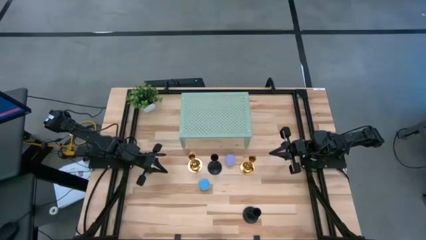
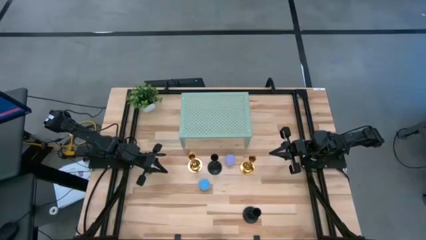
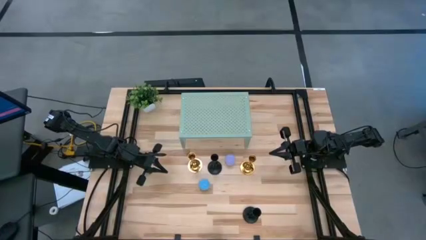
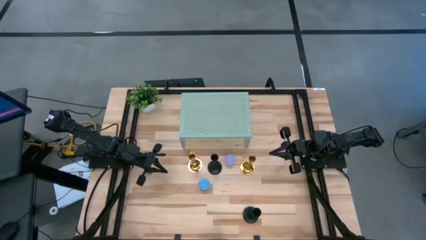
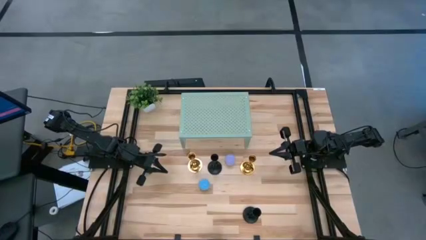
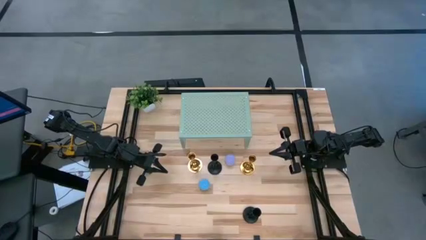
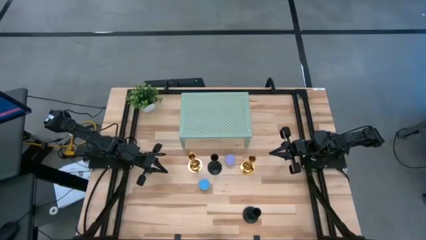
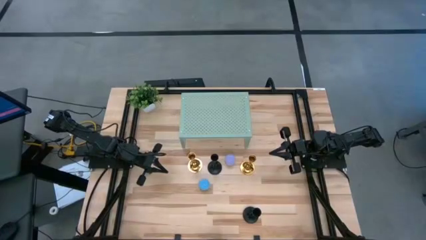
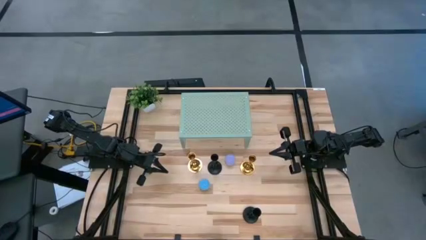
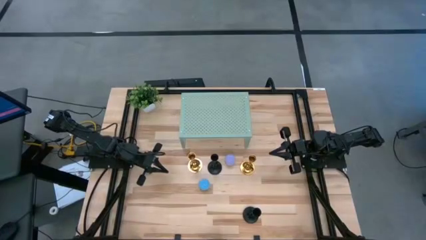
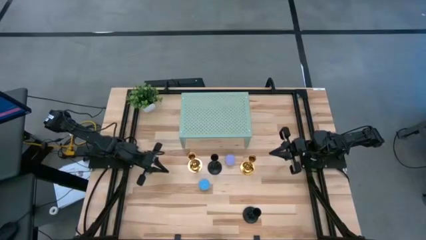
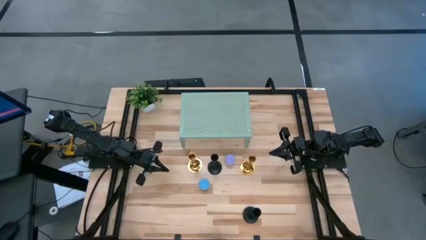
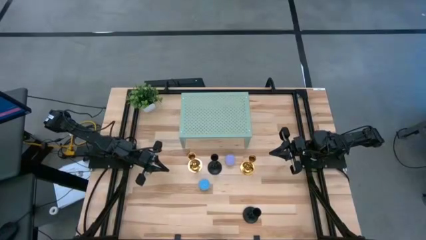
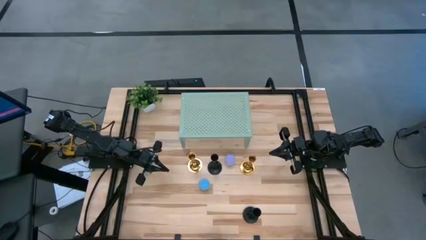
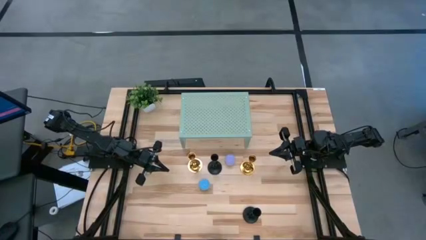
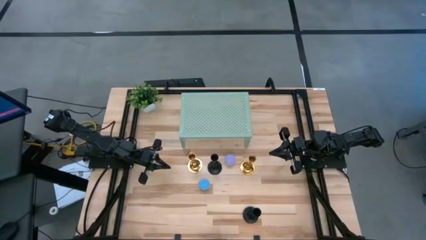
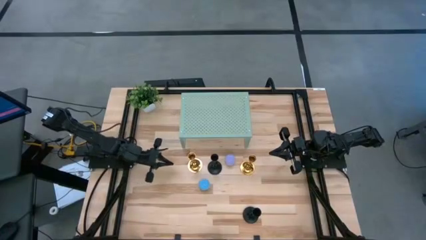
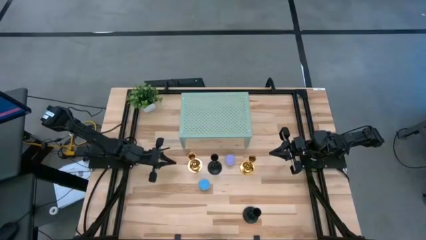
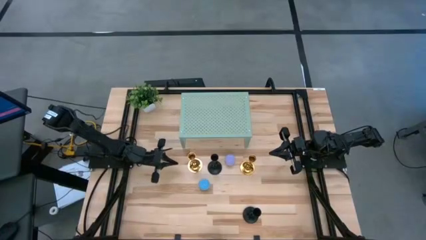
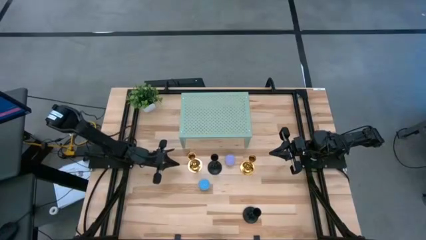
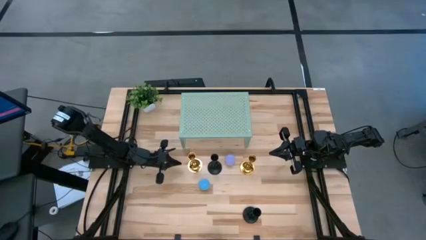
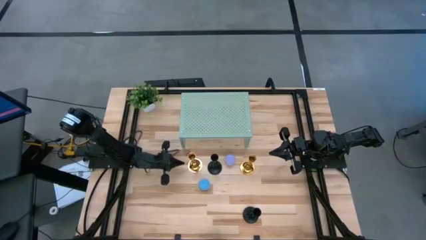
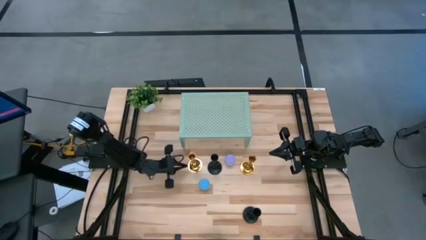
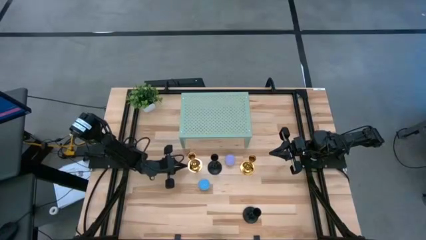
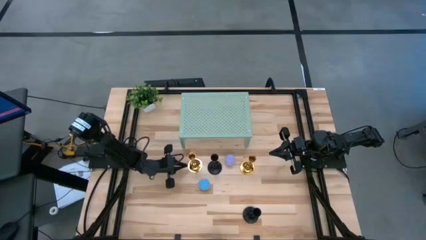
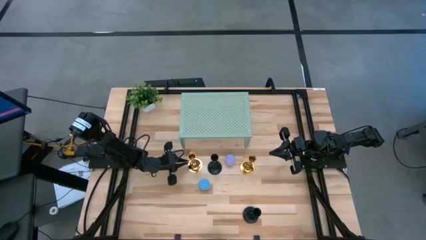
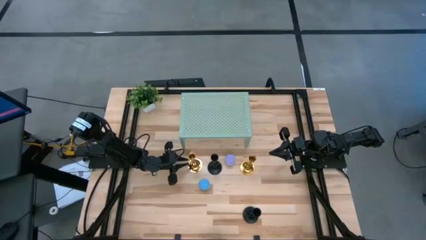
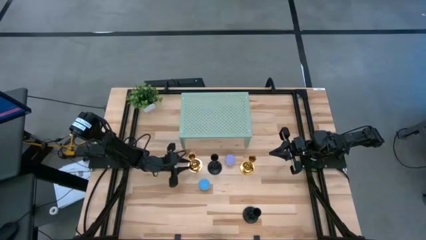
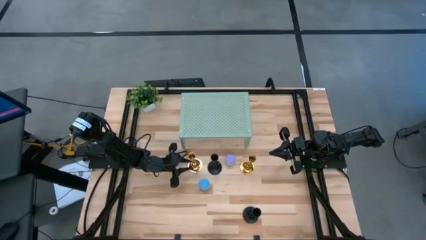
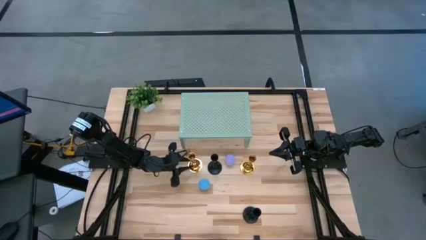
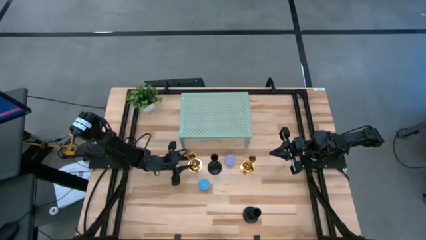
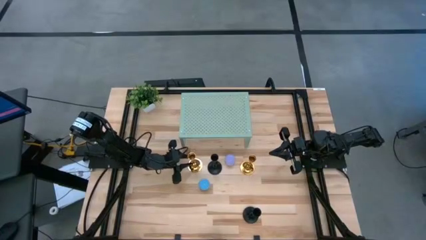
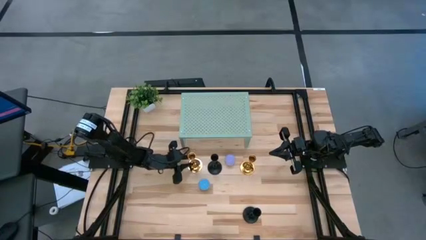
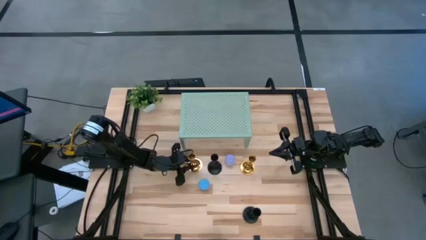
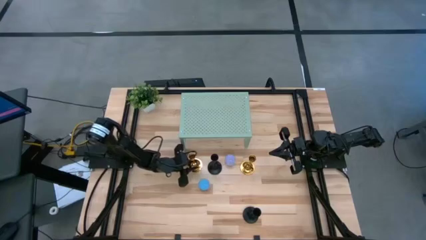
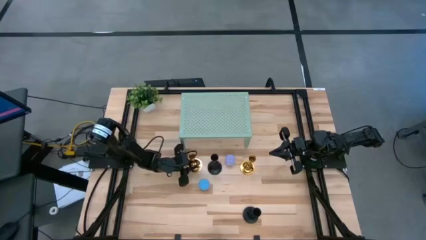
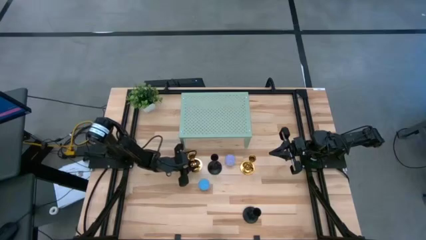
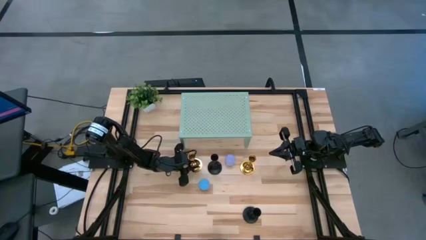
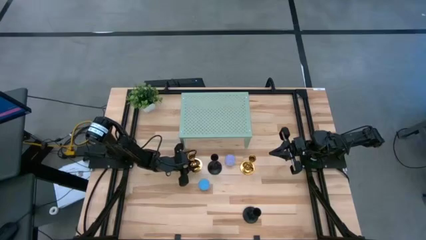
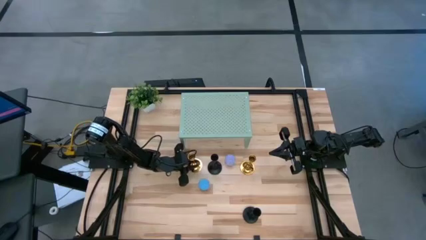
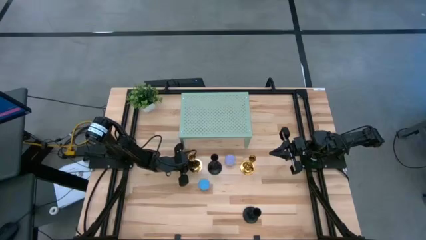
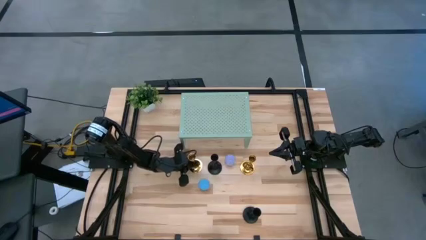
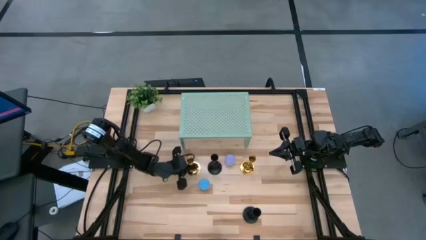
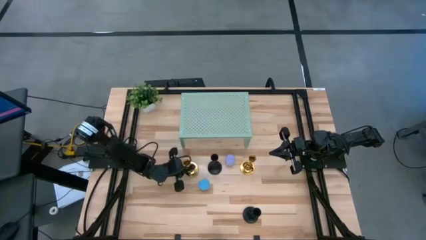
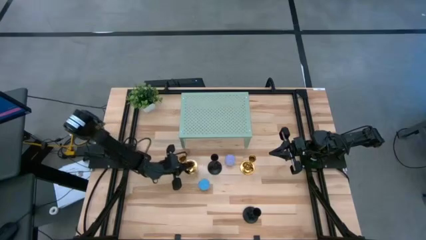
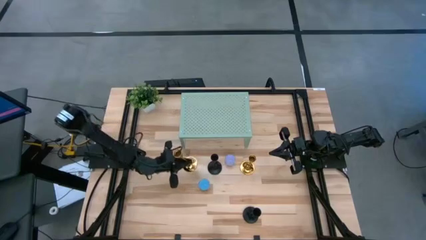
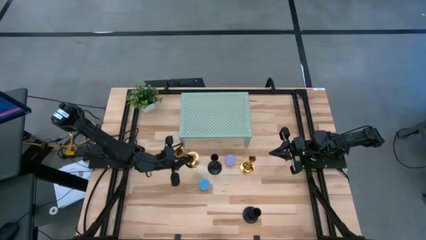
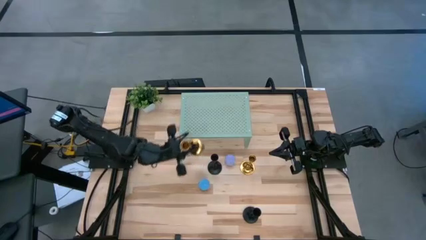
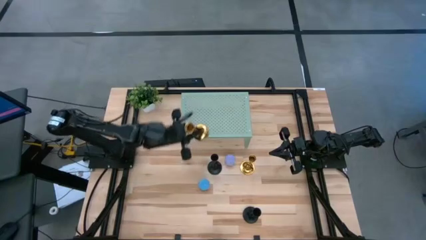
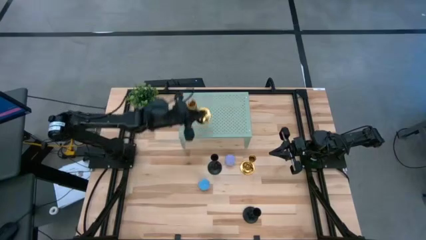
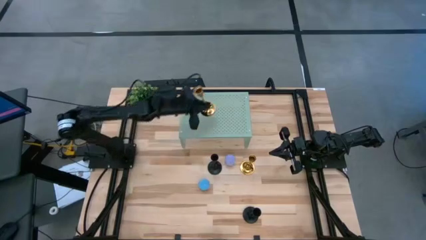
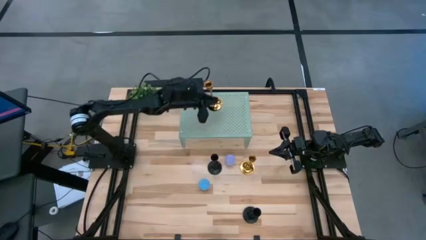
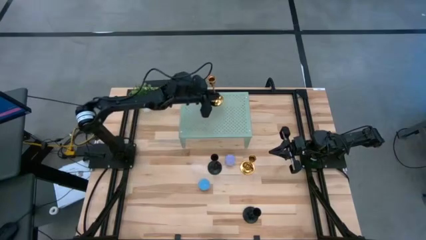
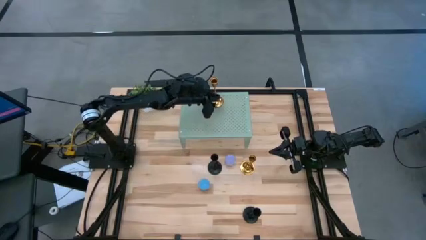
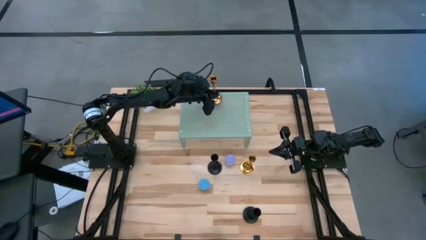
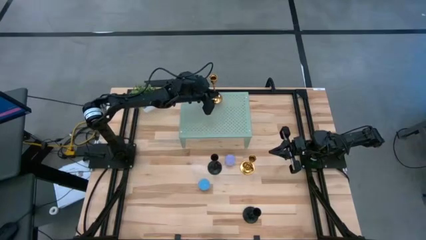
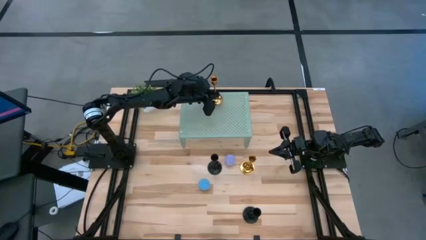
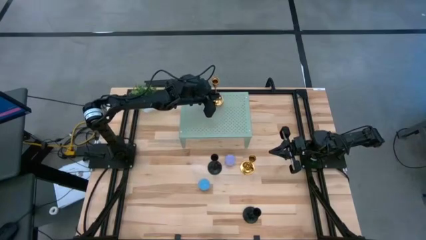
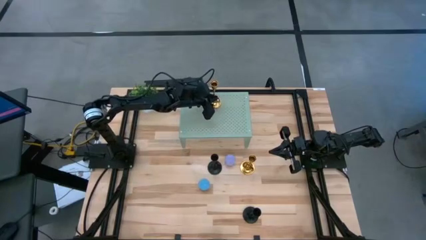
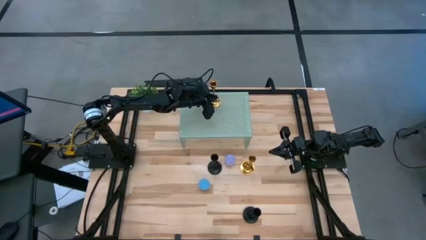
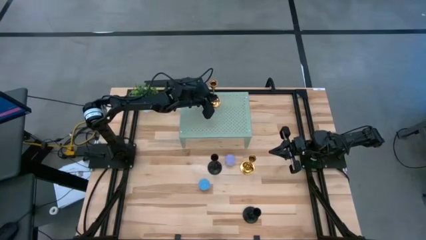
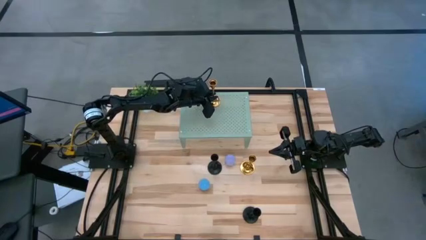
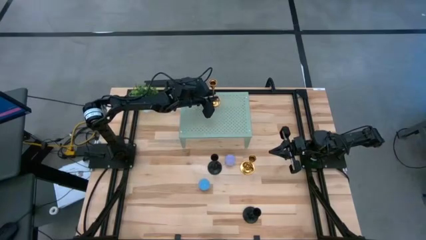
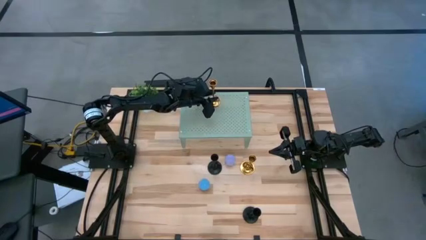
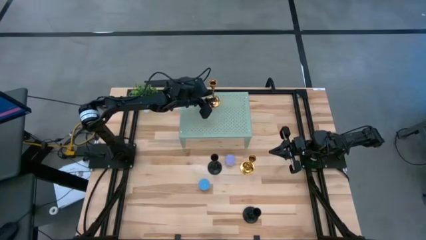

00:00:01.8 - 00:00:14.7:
Task: Pick & Place candle stick holders
Put the left gold candle holder on the shelf
